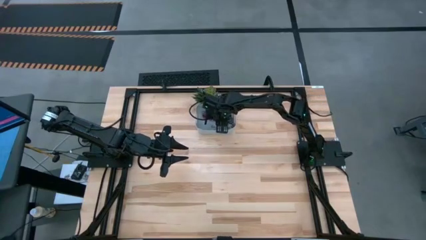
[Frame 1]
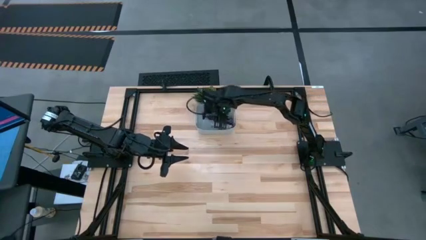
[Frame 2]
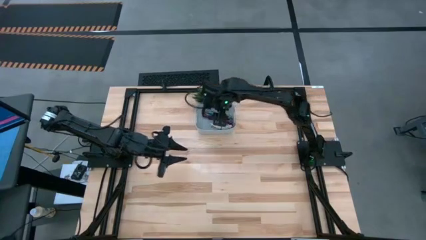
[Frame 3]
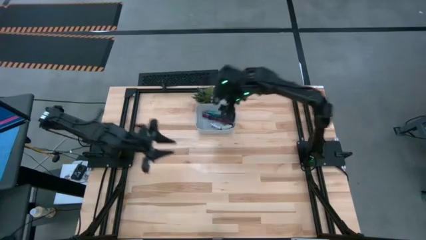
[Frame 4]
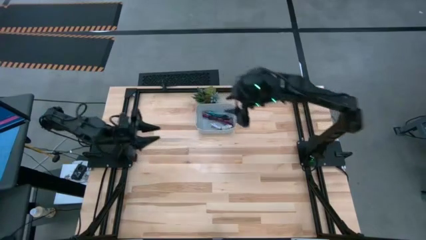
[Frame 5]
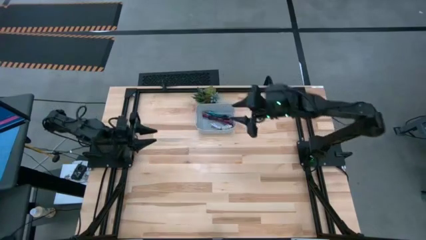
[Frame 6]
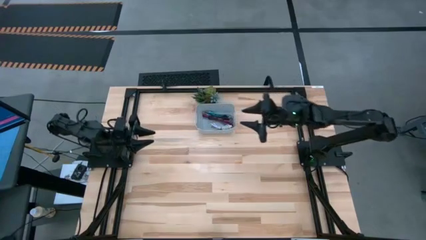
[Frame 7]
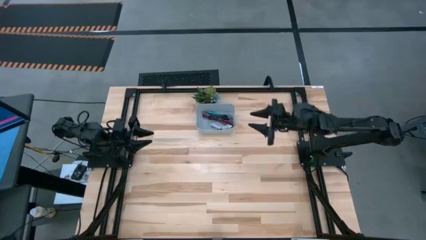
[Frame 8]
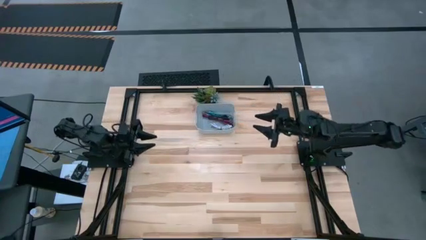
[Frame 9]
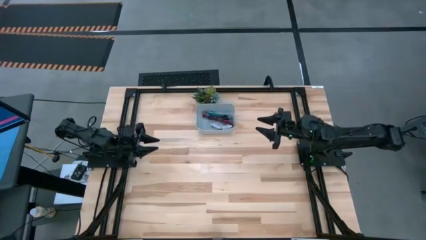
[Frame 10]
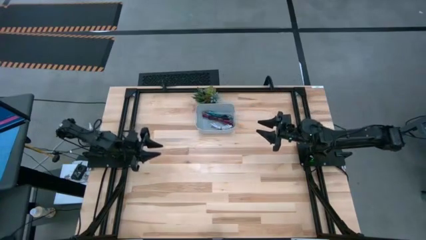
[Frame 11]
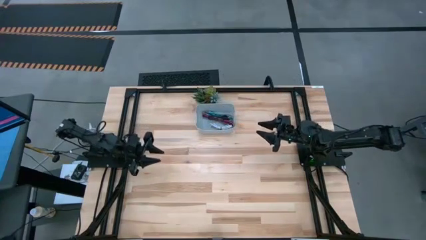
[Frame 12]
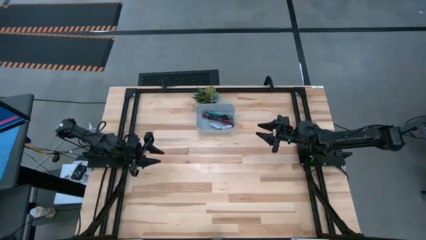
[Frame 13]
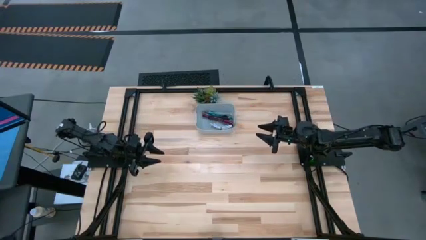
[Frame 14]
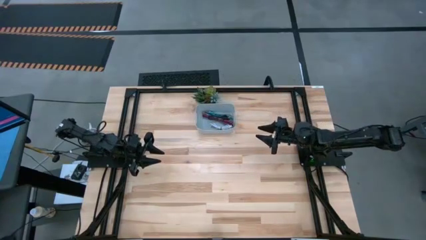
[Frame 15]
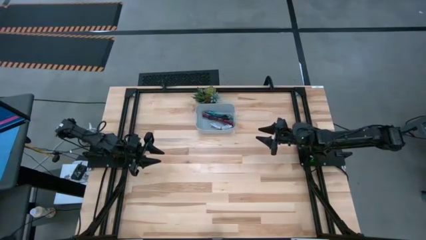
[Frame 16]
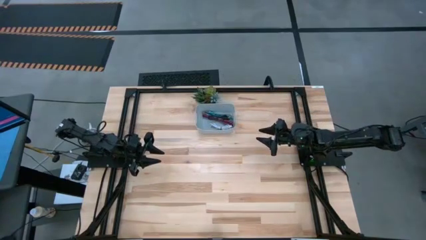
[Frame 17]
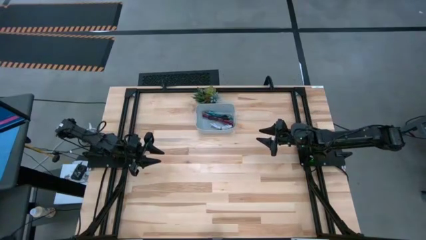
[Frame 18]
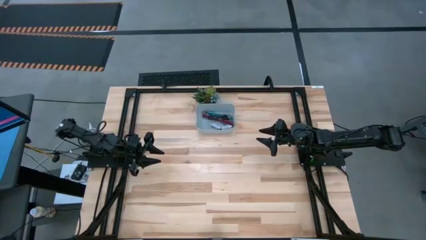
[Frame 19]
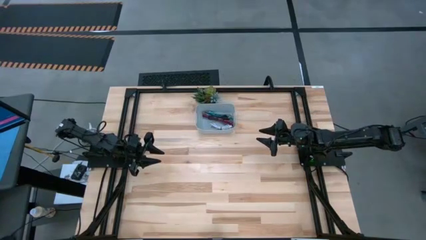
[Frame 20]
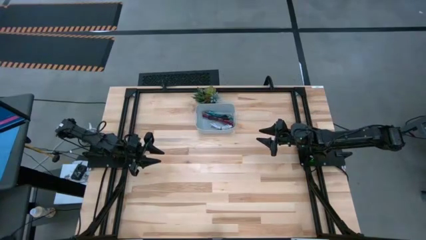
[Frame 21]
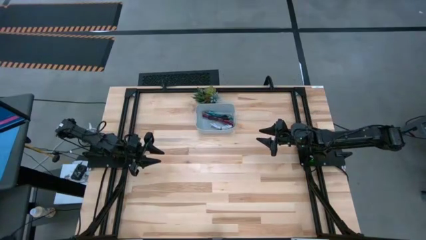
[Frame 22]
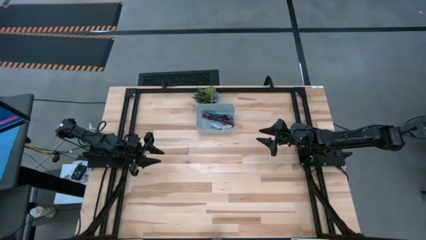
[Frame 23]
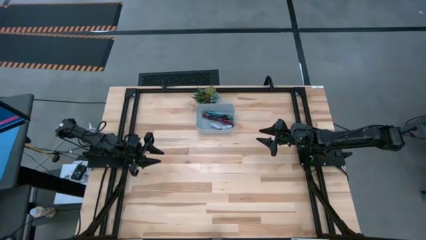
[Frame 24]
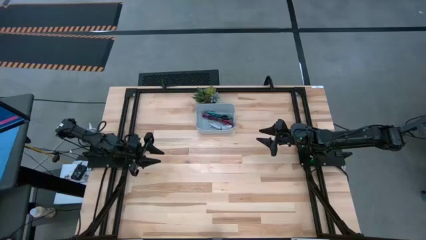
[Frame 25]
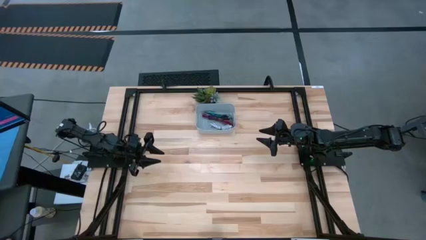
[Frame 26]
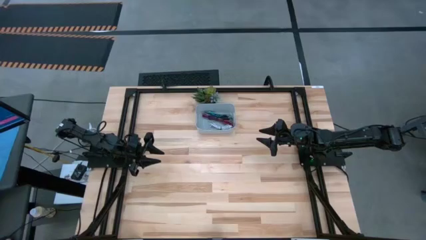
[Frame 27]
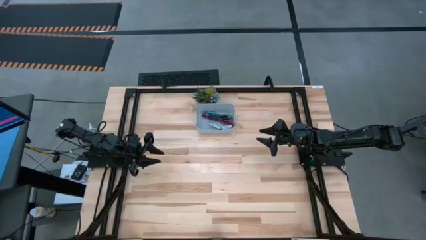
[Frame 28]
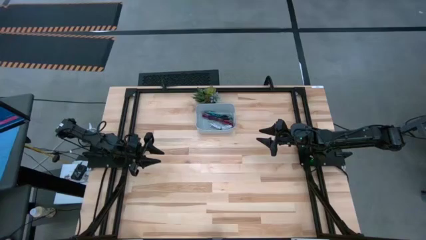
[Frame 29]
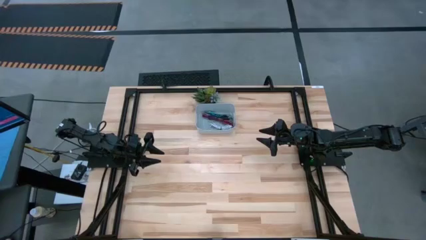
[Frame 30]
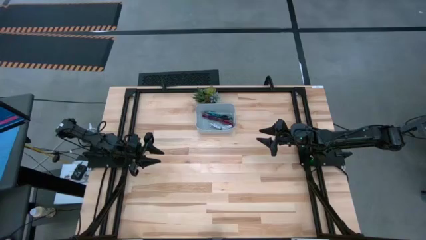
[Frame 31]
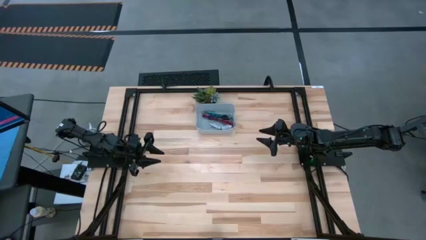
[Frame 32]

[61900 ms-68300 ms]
Task: Pick and place USB-C Cables
Return to Home Position
